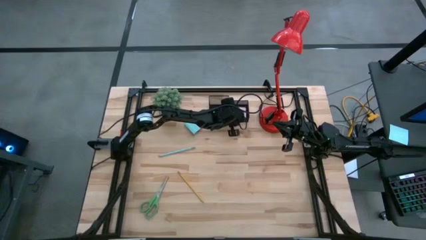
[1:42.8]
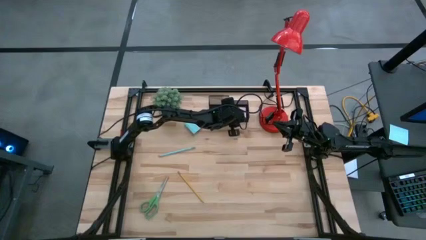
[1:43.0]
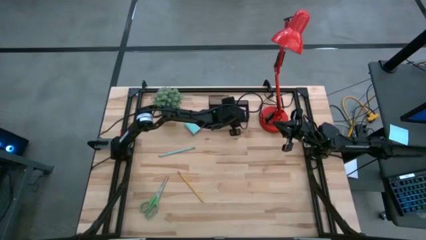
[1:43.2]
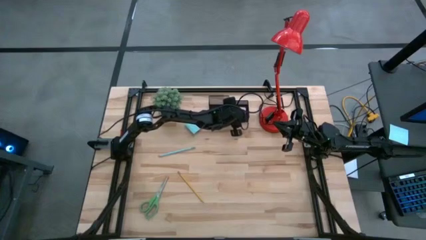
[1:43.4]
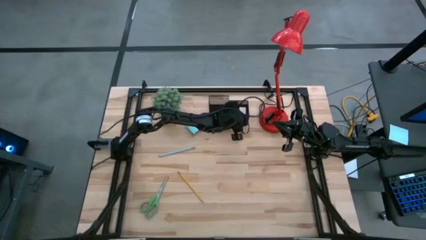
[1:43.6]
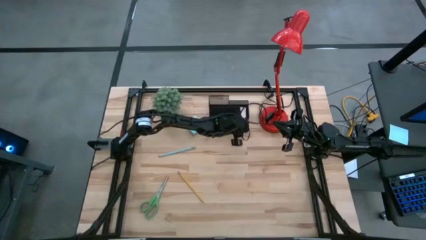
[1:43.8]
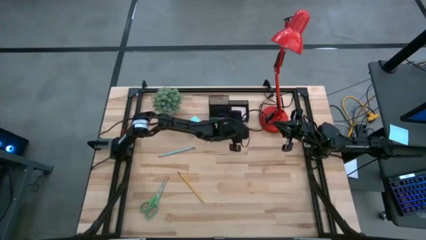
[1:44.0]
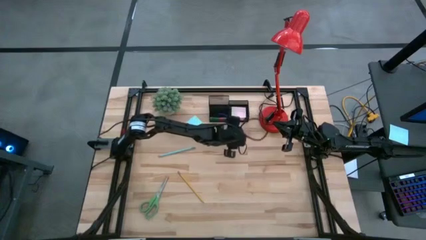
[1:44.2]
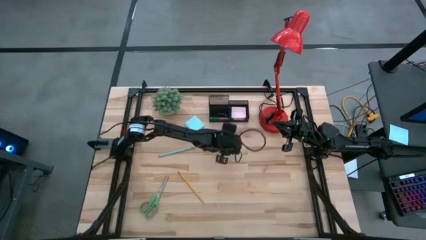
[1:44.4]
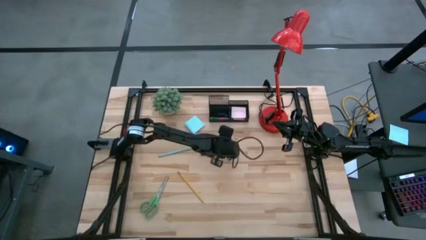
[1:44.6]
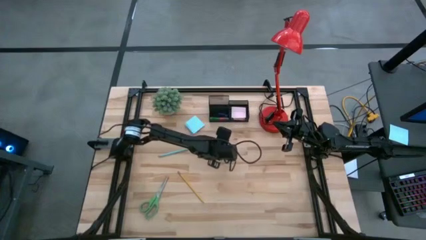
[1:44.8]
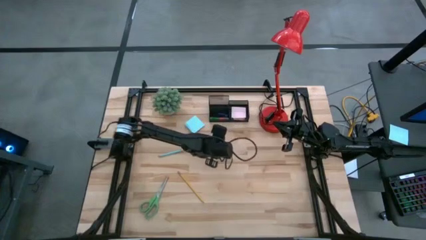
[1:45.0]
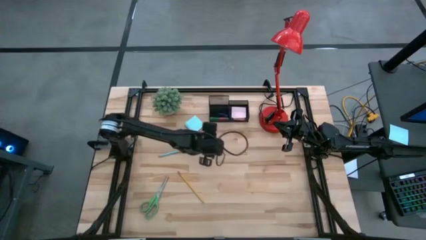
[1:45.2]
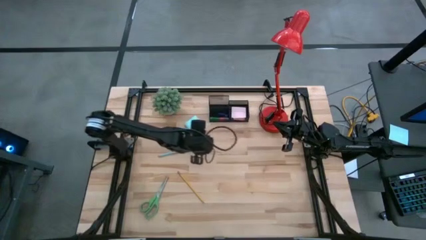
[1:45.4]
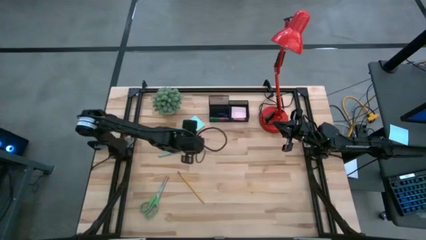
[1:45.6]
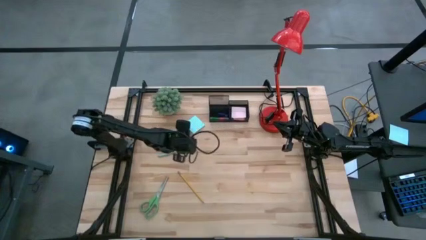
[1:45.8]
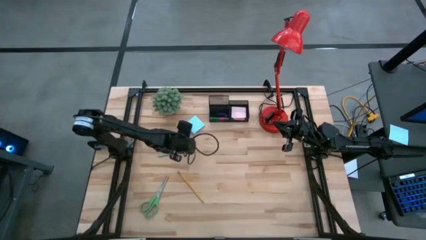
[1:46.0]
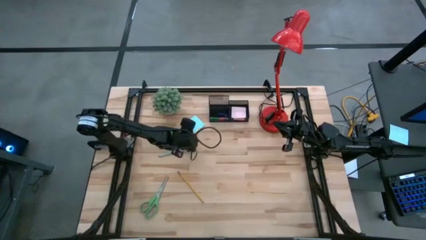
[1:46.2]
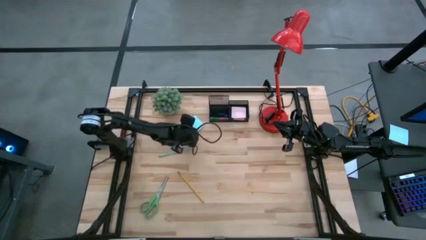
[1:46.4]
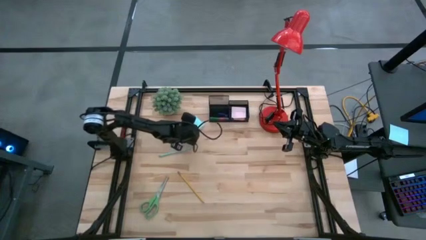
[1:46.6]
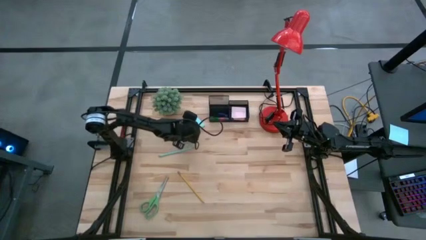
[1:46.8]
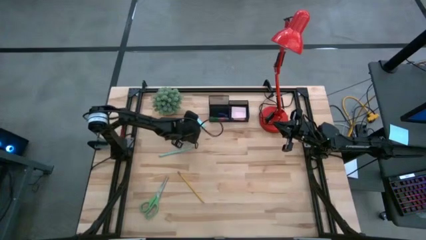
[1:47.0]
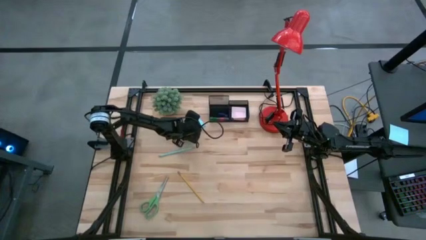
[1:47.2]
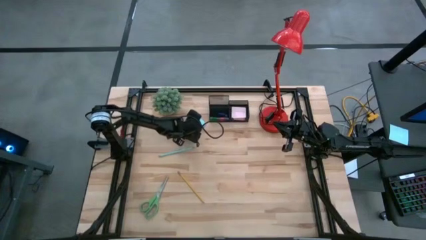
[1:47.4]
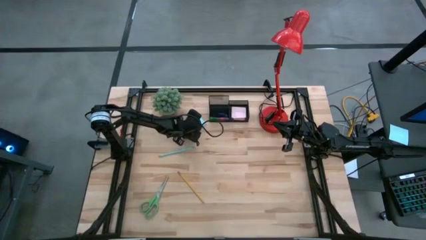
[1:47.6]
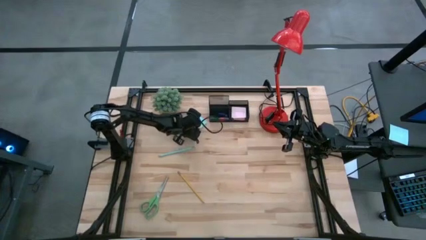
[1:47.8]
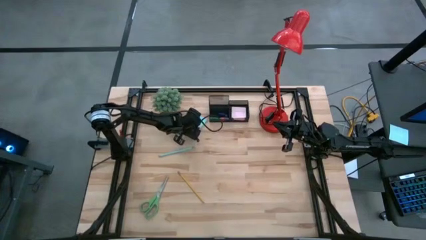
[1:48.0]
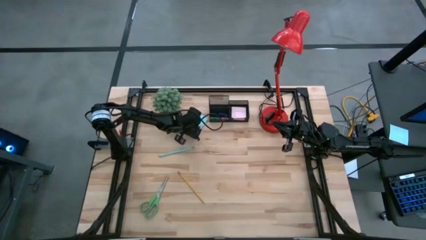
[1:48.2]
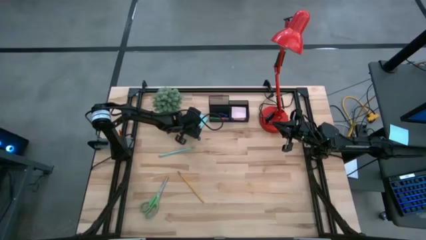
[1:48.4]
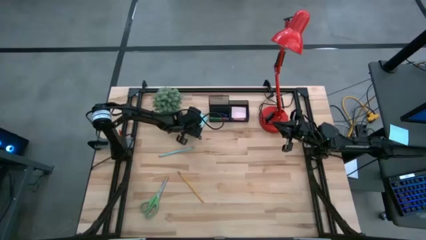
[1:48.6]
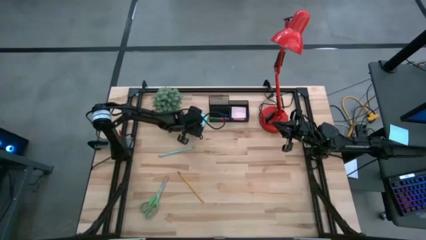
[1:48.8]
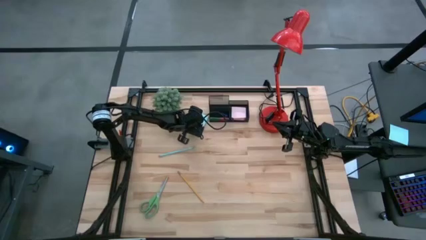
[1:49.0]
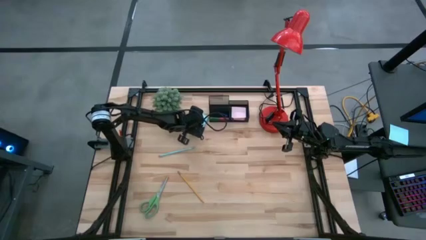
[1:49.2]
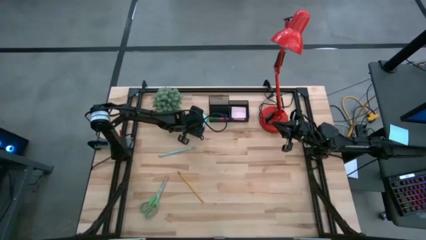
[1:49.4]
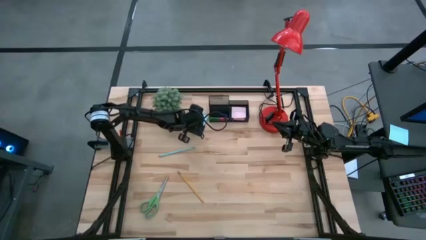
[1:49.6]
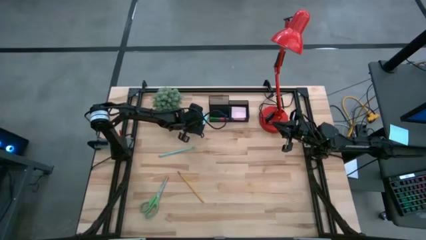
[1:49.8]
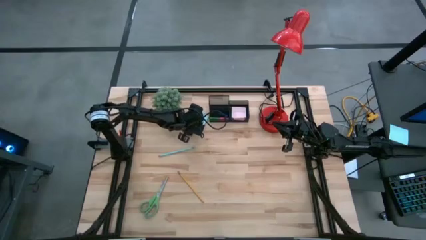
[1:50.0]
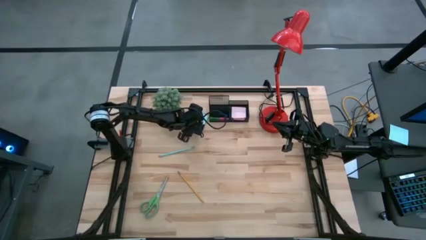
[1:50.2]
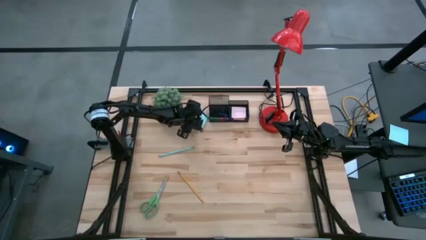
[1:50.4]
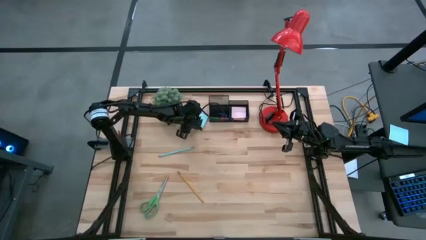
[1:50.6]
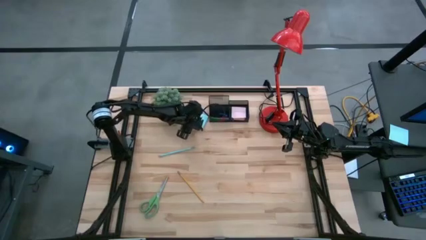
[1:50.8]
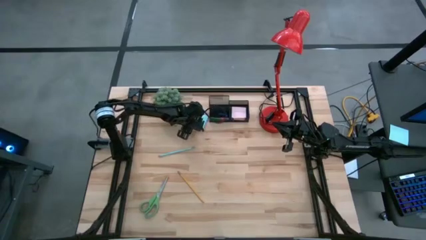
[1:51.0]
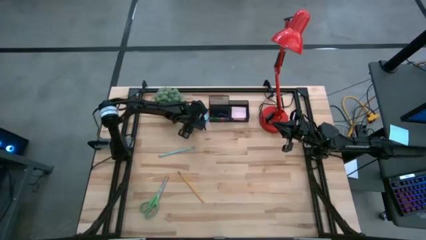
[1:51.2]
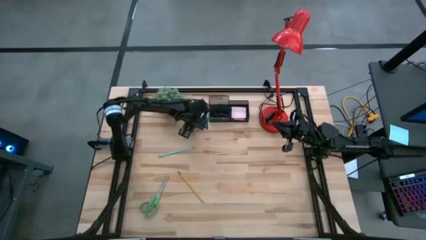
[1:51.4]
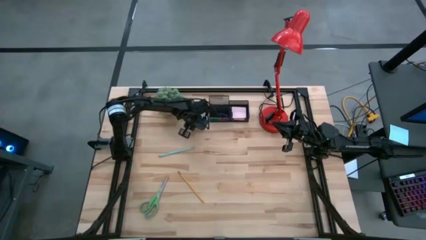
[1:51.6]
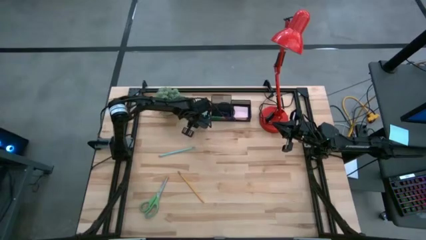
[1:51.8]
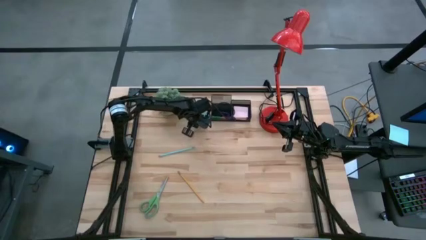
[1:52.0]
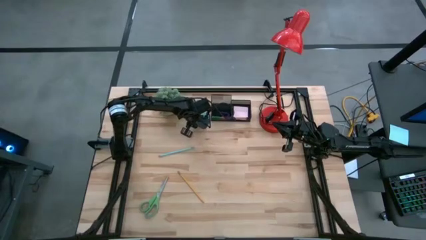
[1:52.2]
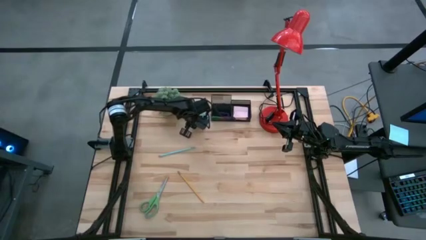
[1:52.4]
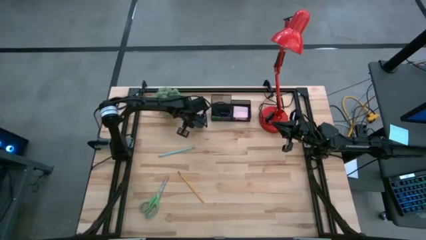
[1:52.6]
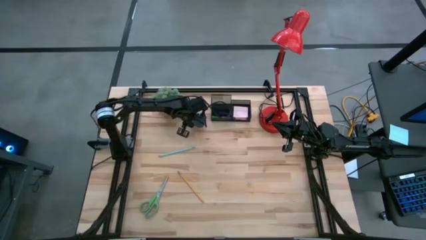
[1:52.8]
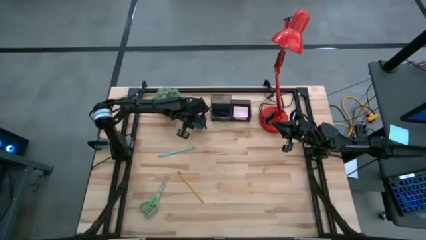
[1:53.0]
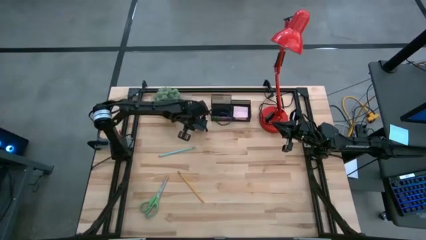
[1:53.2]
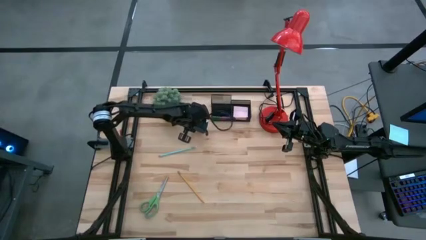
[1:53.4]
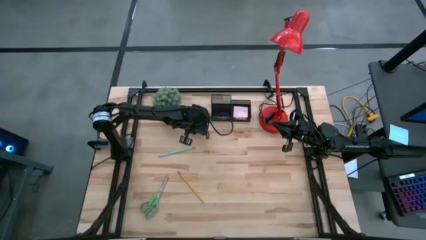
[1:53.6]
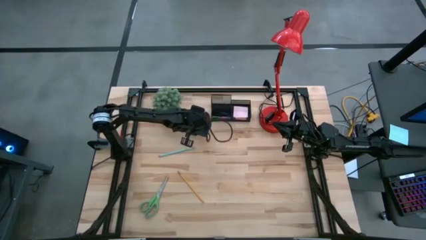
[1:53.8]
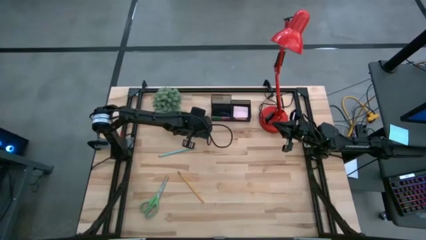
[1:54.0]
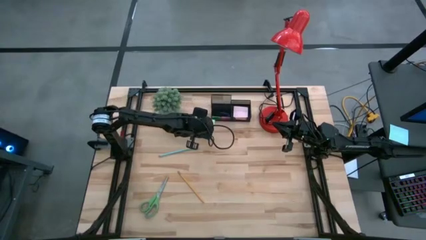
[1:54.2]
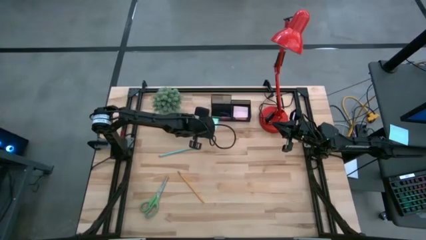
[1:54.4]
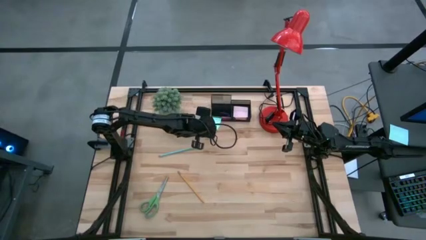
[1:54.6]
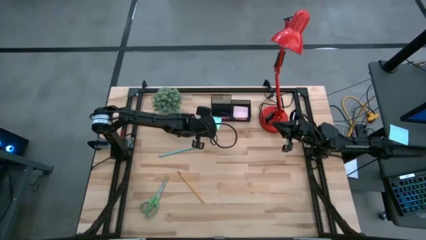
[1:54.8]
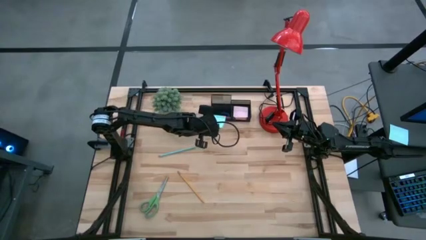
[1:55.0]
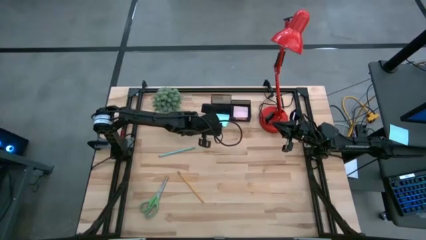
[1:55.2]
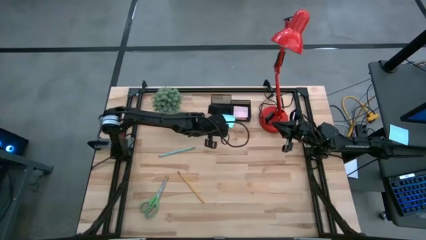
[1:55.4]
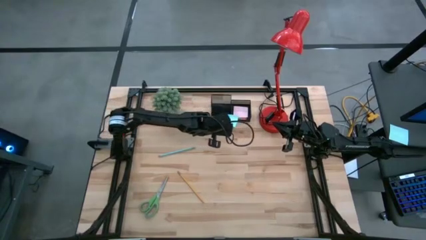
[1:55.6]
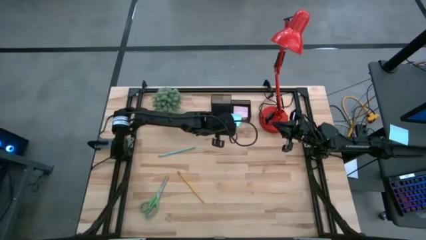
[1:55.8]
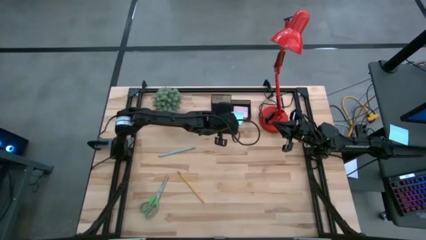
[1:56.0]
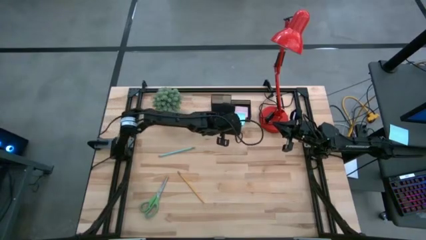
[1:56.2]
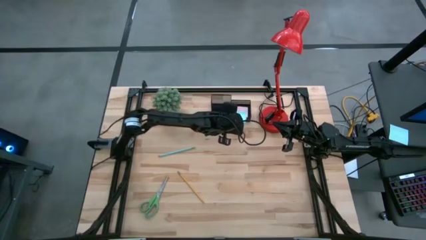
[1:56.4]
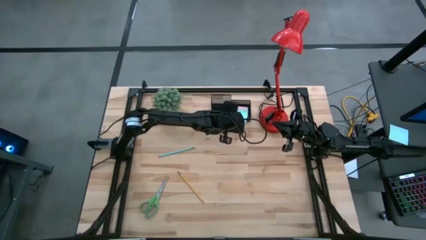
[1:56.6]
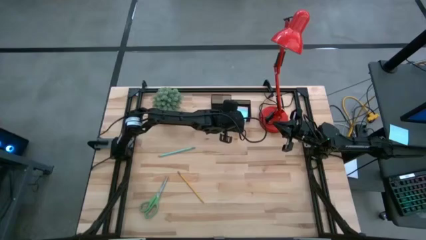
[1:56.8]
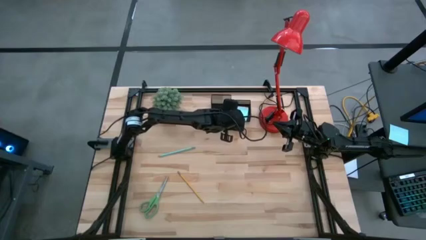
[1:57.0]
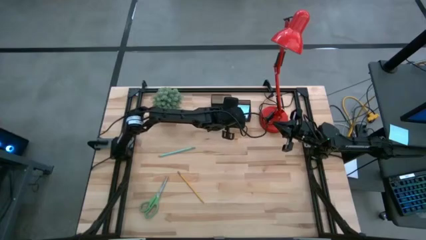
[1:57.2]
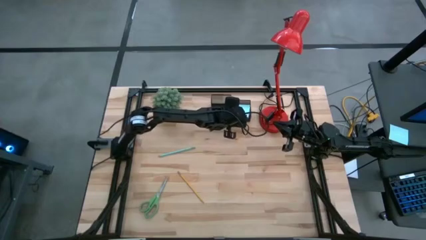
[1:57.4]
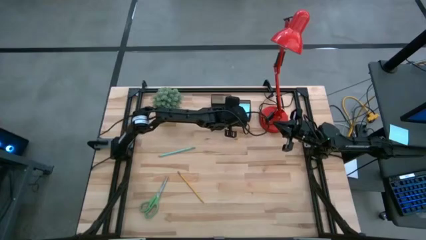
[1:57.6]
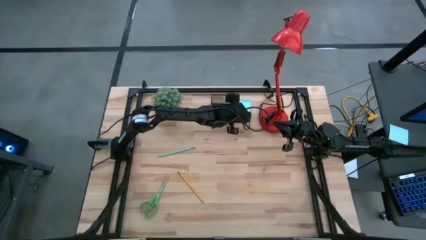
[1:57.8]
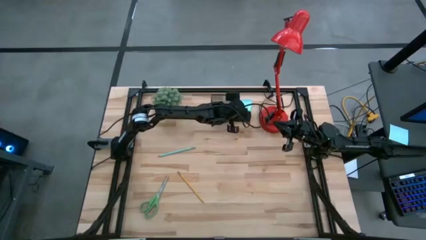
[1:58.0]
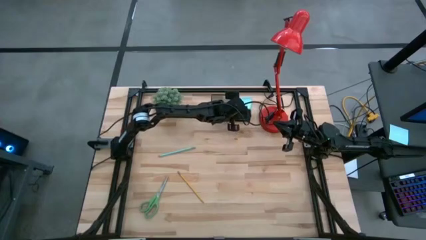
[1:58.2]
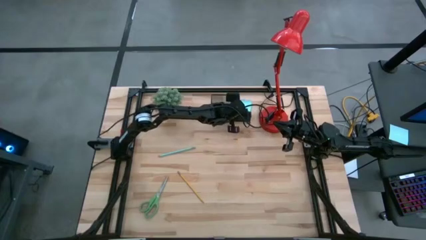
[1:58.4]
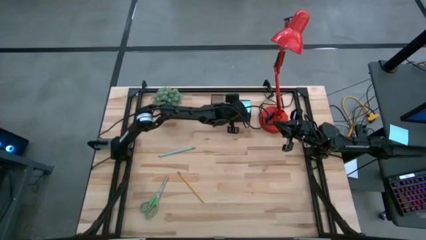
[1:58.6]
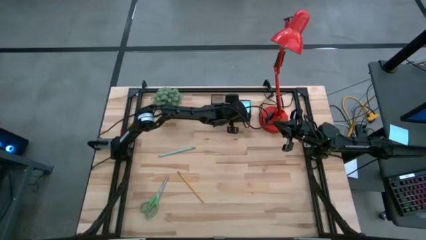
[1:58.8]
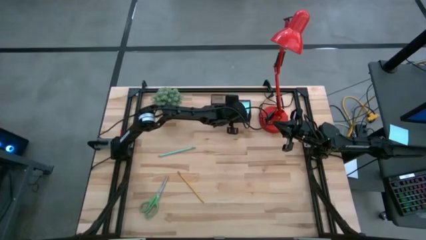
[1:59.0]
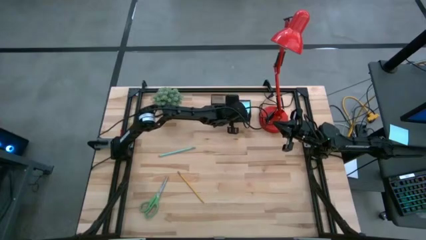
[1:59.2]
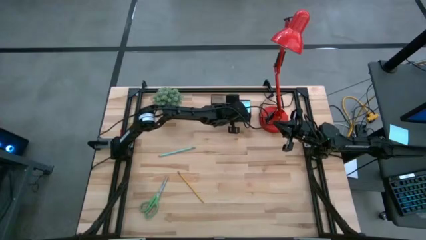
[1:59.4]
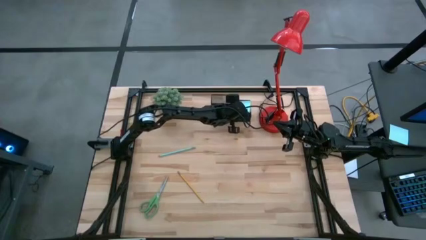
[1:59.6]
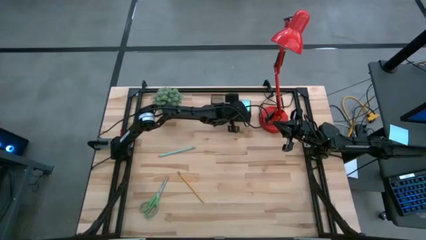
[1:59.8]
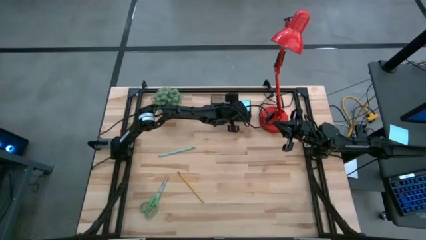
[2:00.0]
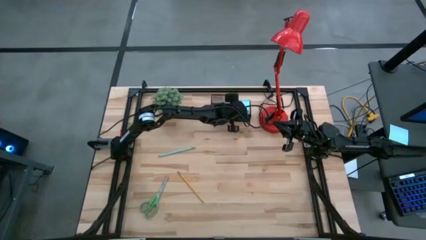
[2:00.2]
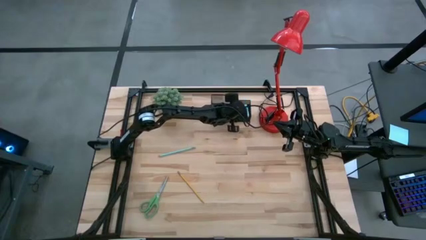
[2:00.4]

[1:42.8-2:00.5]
Task: Pick and place office supplies into organizer
Put the sky blue sticky notes into the desk organizer
